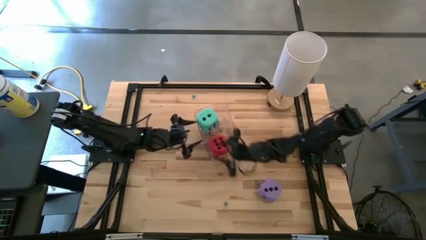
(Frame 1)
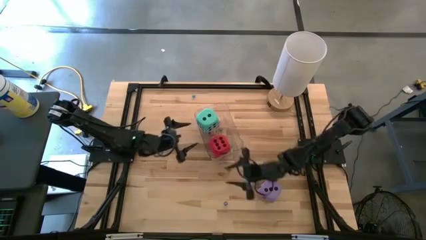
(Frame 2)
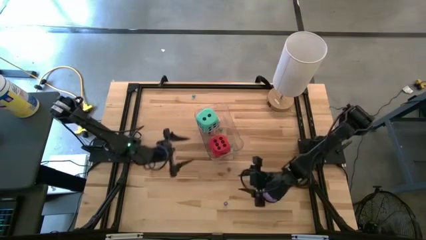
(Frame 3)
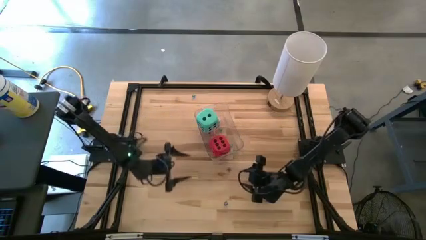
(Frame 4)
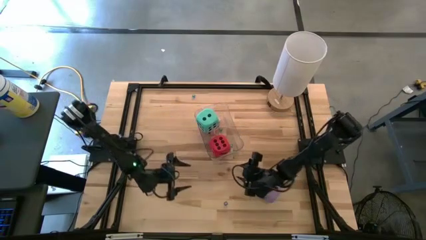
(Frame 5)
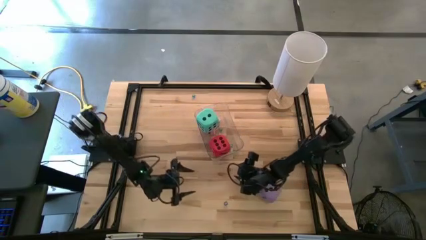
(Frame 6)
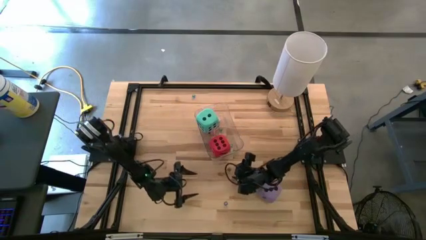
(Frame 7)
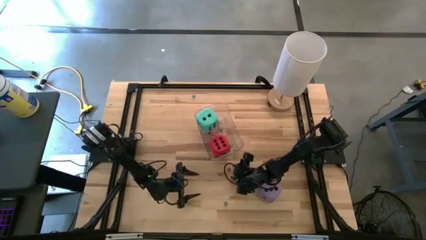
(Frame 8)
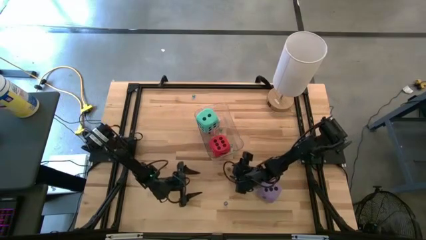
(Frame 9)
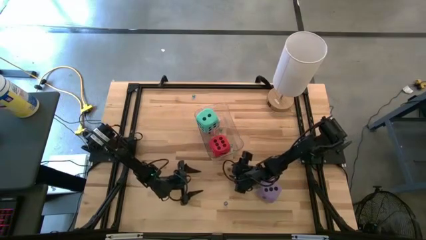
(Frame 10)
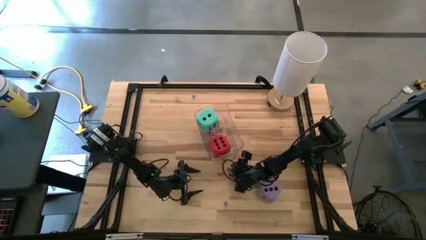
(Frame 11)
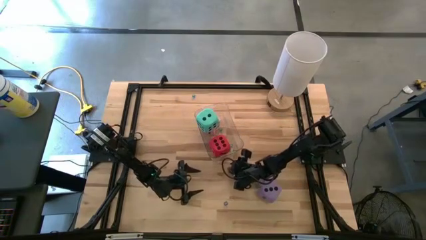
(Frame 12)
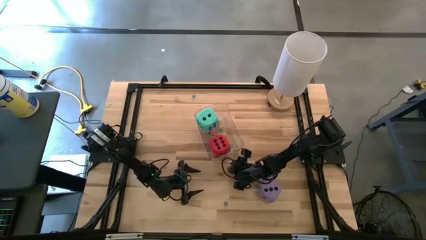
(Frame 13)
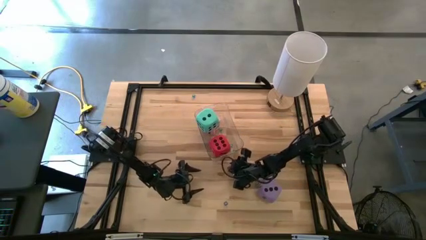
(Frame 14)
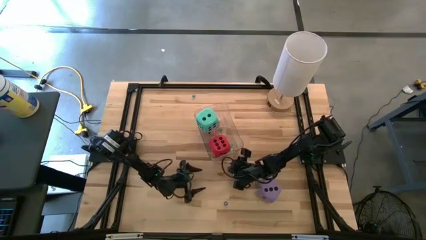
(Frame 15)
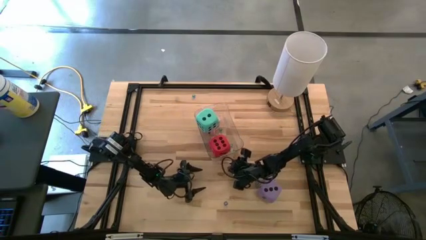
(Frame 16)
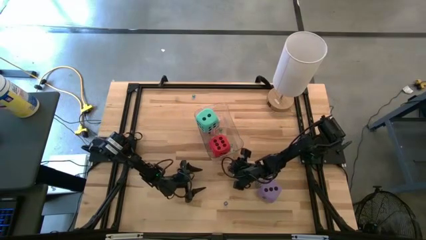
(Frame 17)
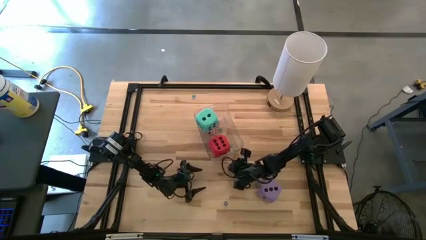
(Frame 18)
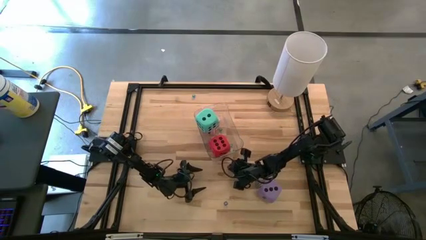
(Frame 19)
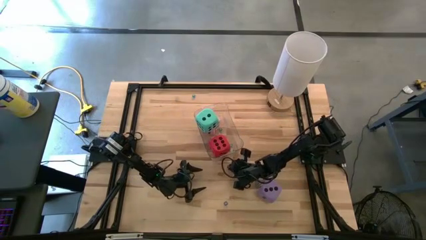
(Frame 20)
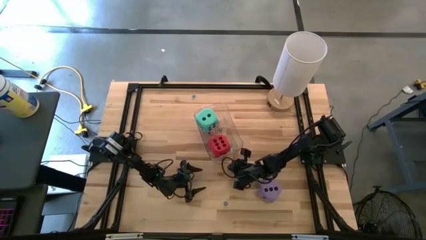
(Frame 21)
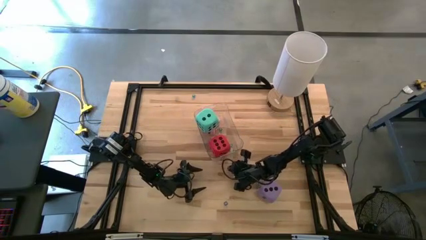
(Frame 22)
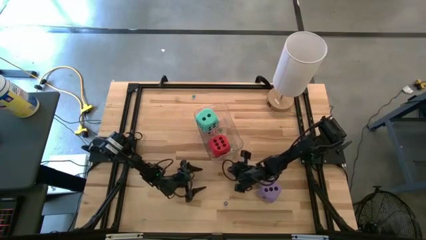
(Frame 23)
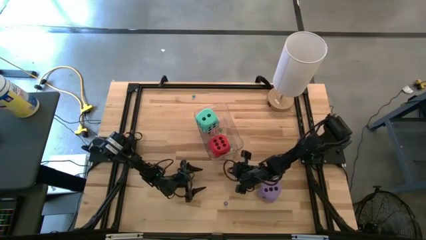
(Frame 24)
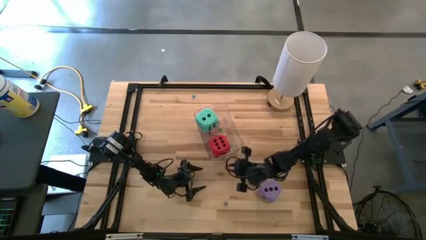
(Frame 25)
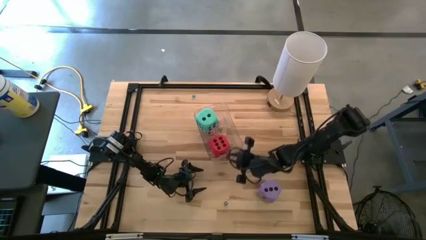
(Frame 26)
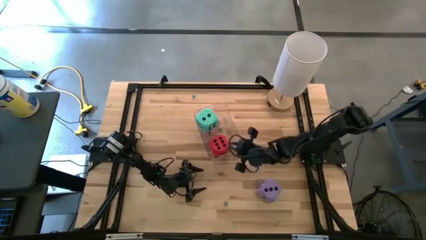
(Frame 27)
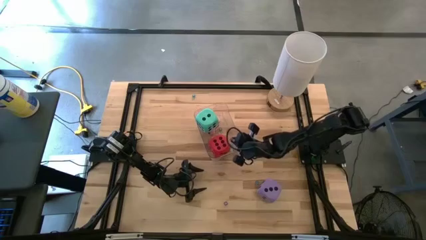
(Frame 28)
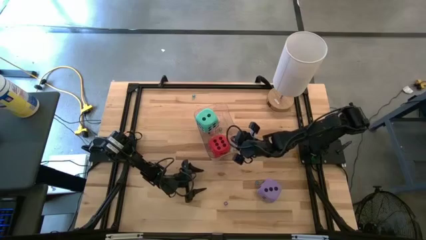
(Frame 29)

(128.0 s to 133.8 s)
Task: Pick & Place Dice
Put the small black dice into the transparent bin

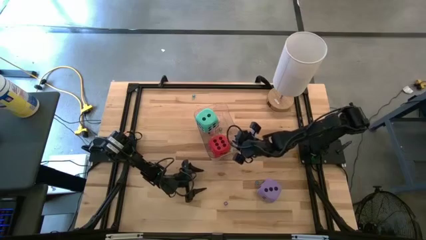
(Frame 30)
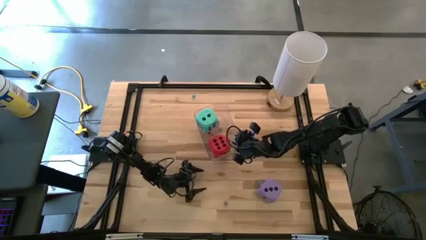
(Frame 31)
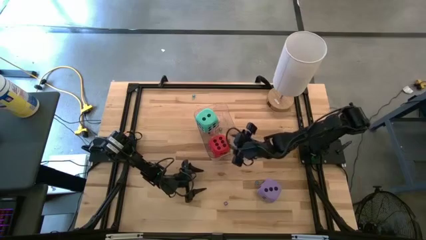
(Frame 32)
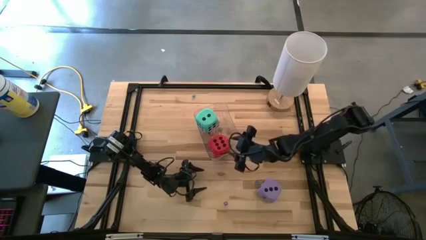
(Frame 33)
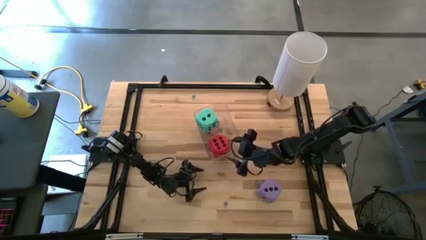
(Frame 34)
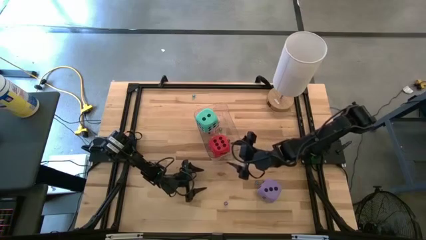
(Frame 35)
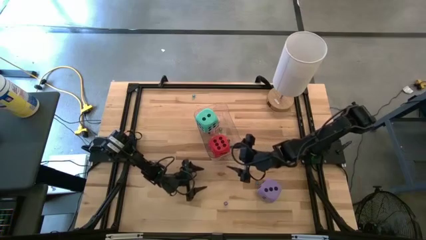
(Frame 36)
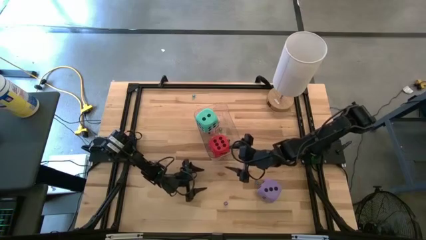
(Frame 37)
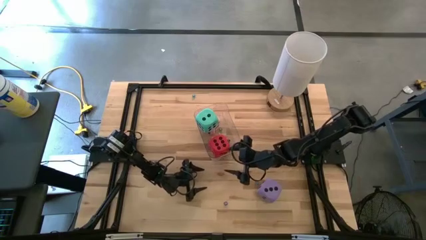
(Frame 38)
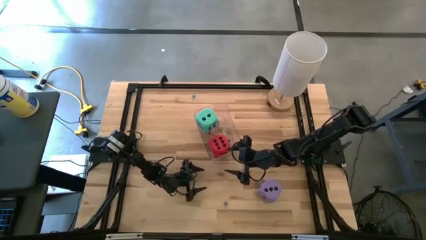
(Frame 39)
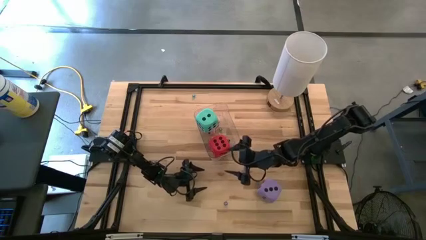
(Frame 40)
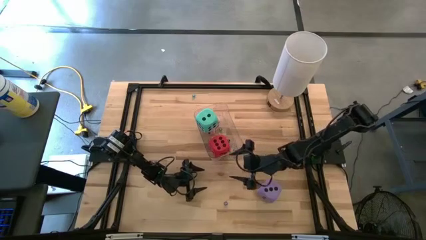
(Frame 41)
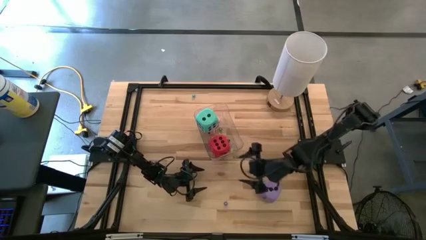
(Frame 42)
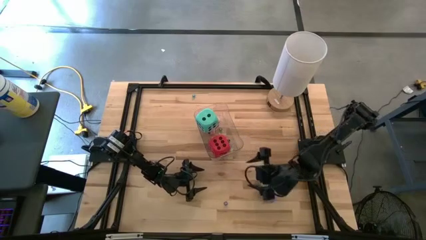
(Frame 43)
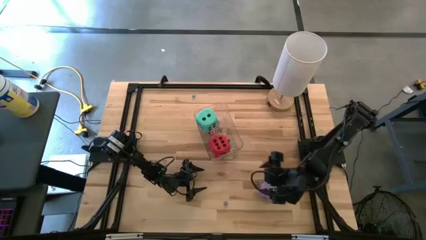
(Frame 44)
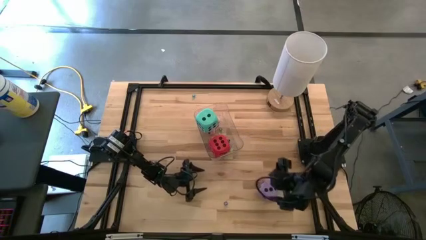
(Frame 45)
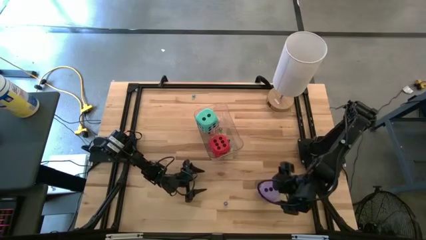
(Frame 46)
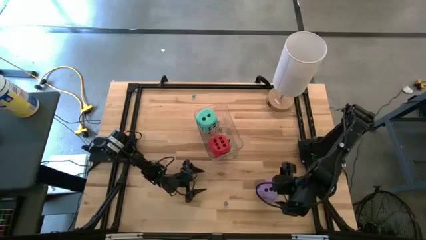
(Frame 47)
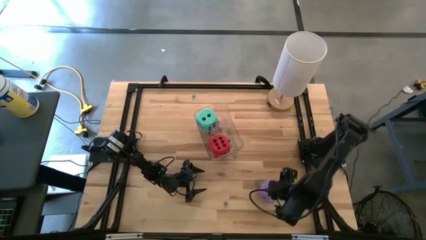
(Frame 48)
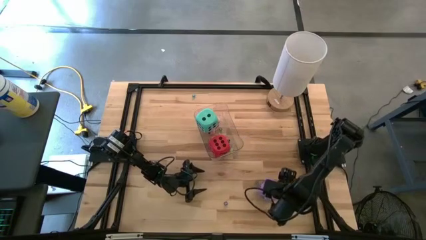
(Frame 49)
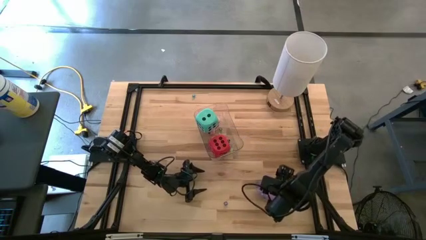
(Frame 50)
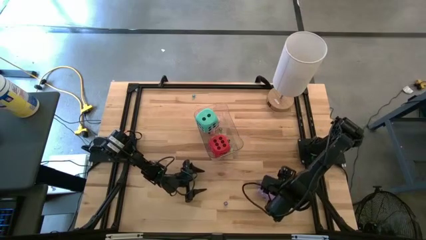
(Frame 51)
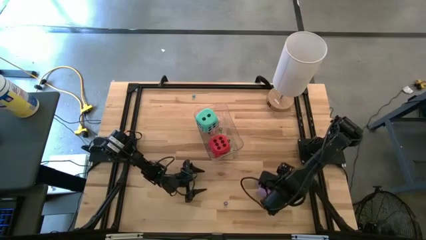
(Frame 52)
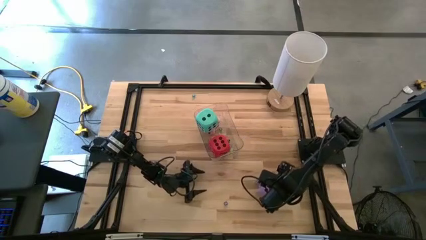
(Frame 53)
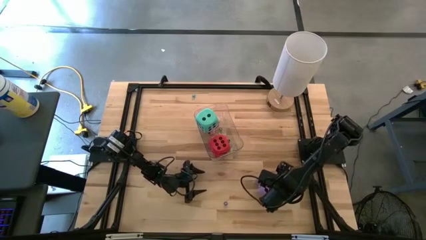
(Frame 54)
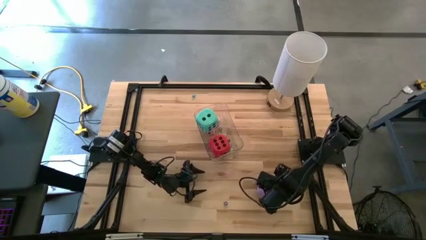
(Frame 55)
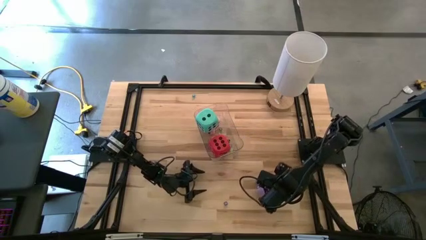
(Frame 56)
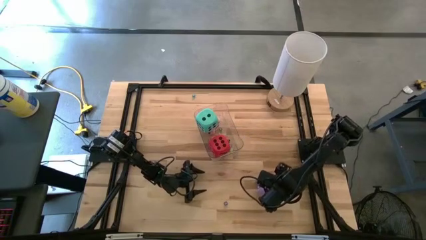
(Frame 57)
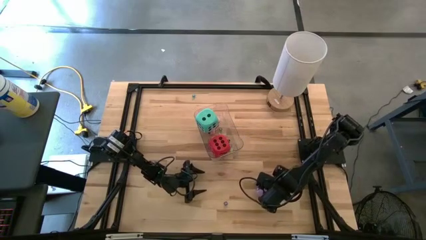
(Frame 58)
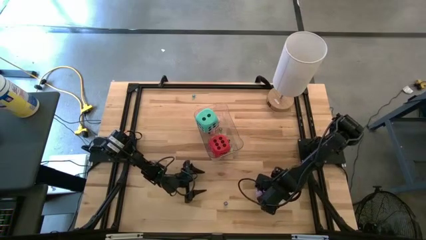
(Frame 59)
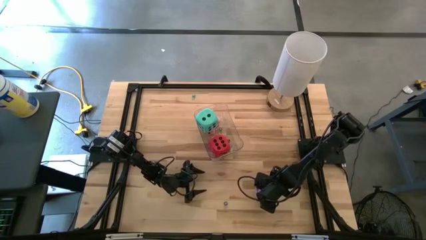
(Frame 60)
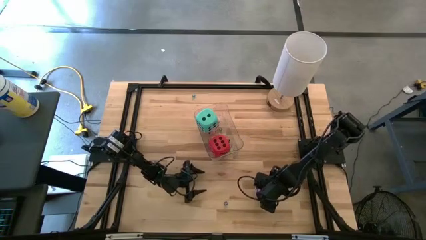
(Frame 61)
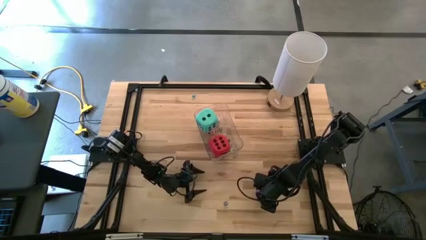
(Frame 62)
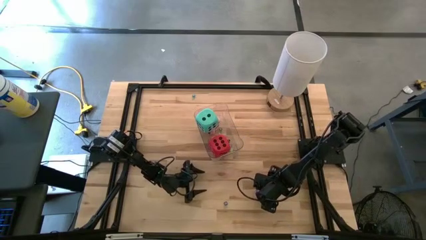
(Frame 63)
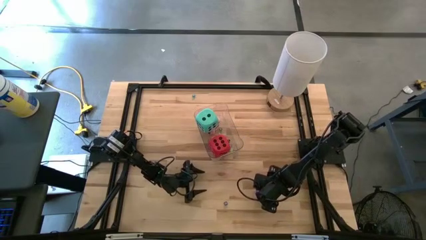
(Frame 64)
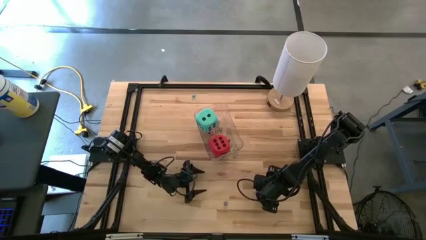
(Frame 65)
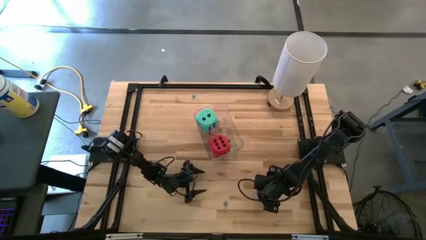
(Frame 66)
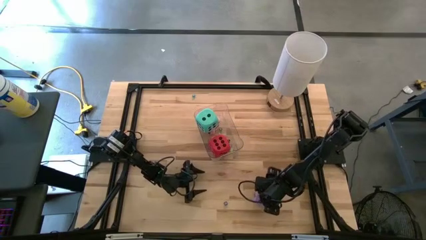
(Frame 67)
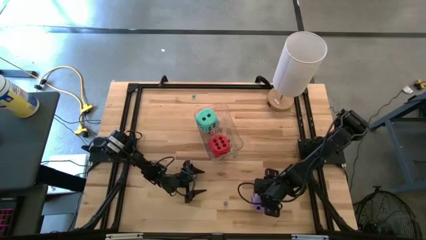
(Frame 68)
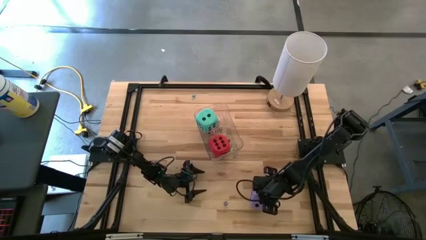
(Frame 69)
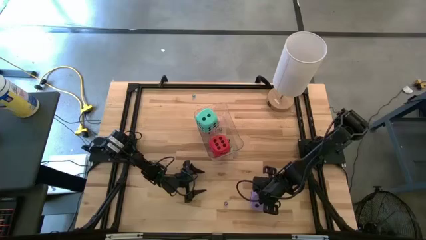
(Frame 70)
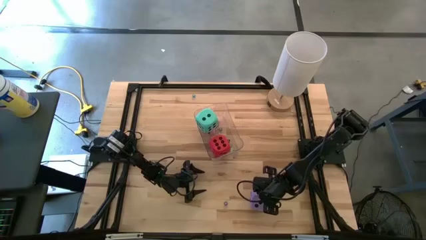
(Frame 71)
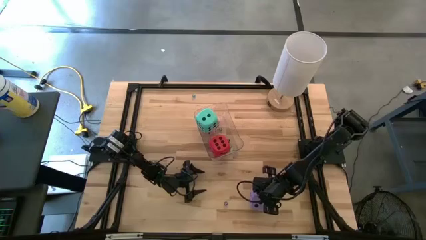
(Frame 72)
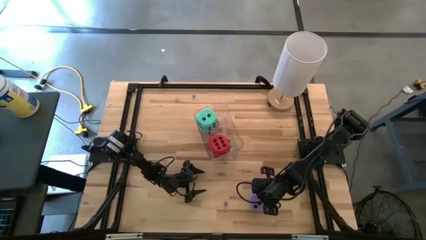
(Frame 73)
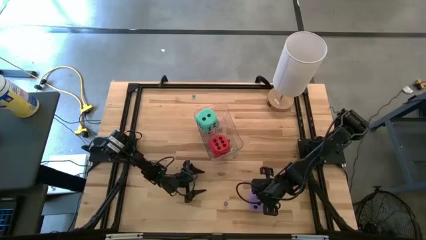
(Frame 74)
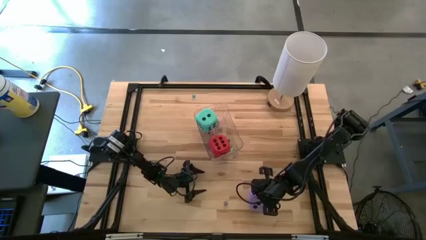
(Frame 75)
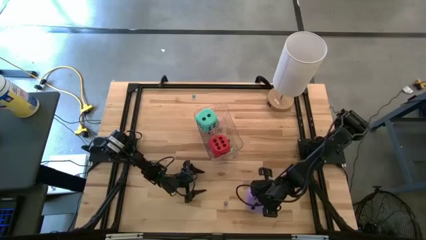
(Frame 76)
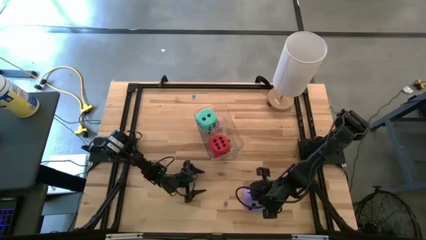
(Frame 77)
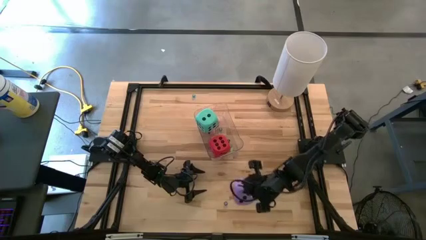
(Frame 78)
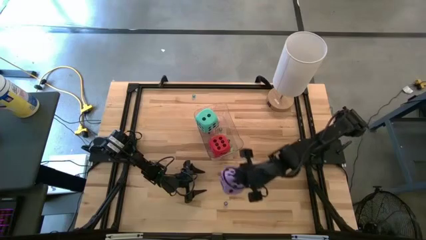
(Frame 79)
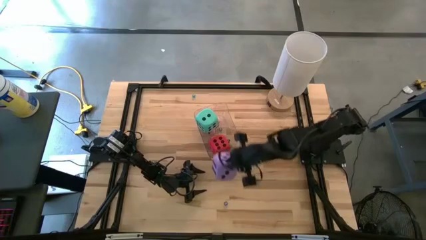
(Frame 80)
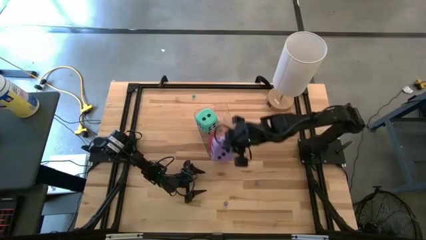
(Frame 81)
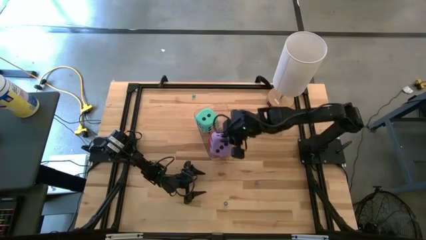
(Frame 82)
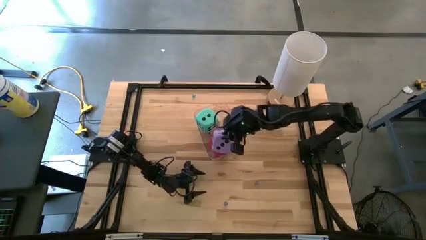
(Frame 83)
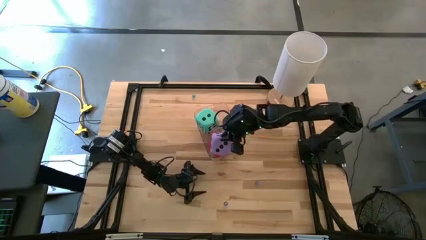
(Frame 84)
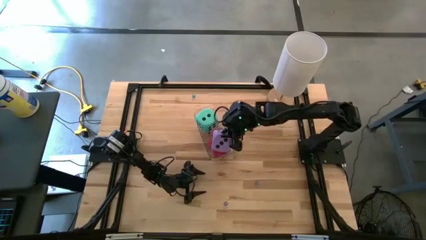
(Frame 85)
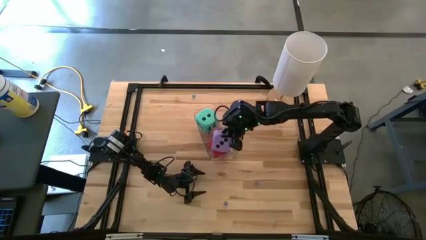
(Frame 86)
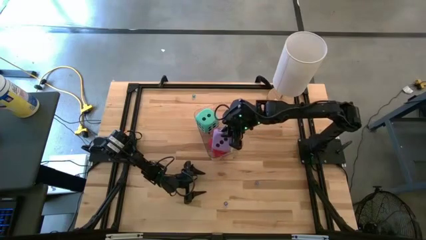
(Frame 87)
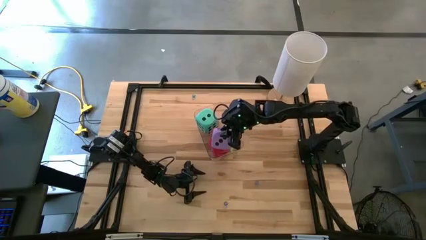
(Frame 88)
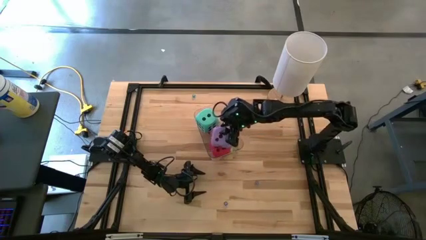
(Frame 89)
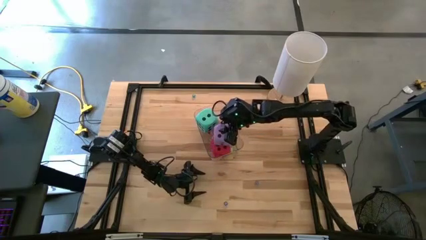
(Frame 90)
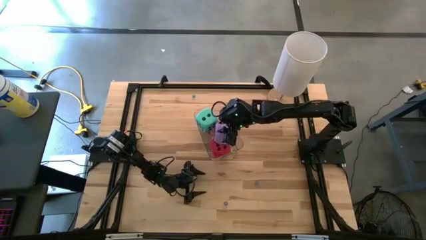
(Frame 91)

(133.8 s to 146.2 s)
Put the large purple dice into the transparent bin
